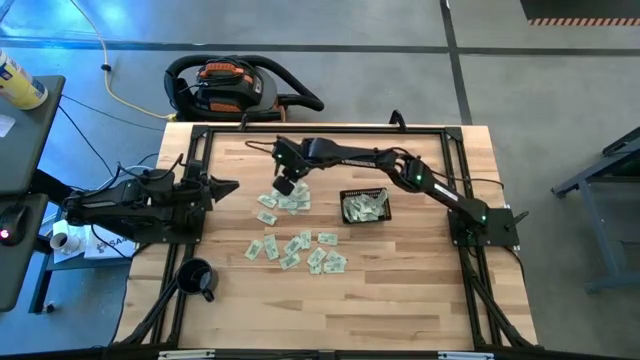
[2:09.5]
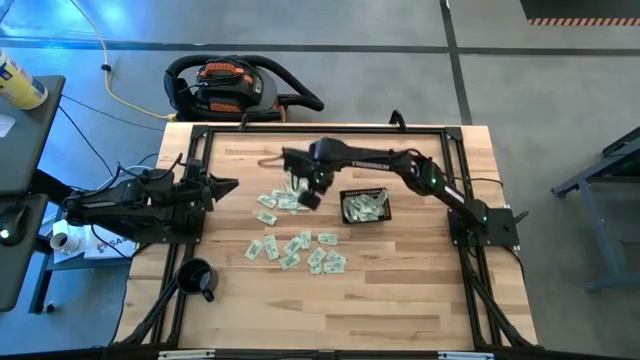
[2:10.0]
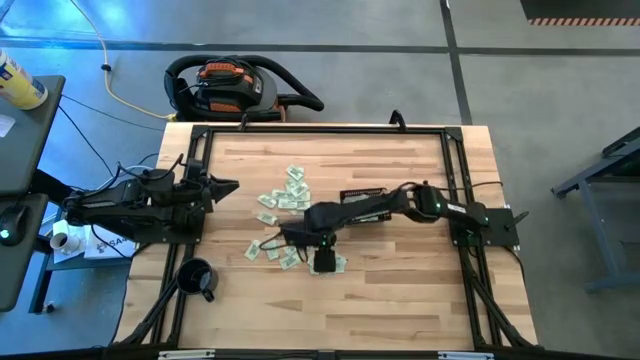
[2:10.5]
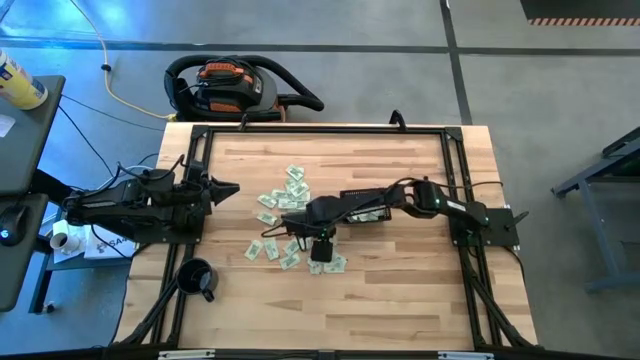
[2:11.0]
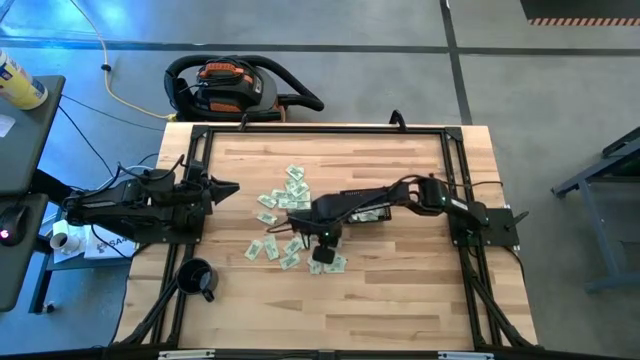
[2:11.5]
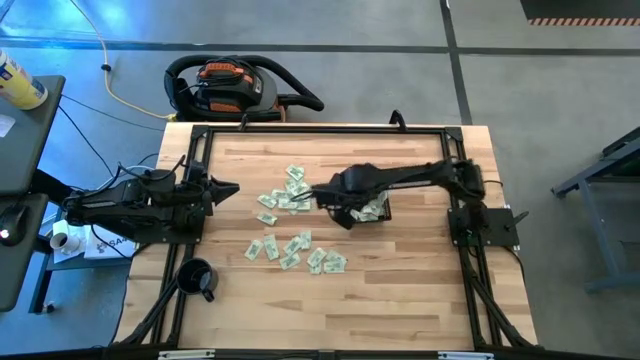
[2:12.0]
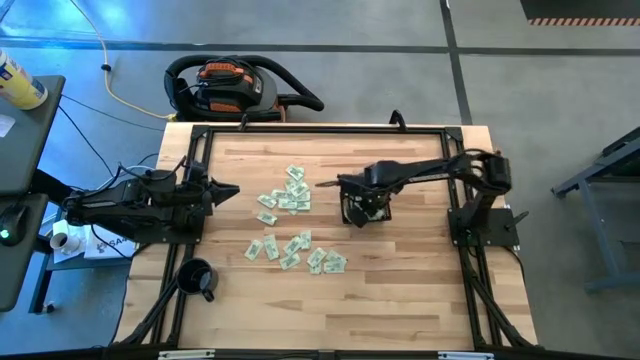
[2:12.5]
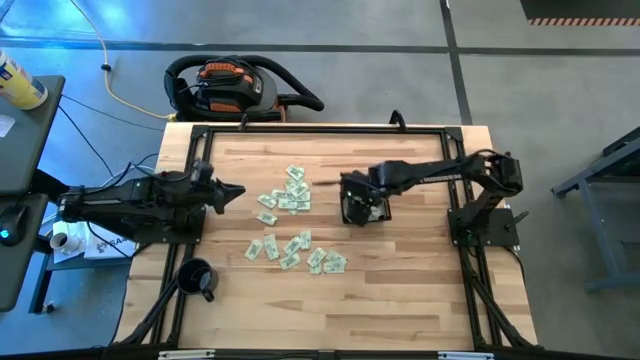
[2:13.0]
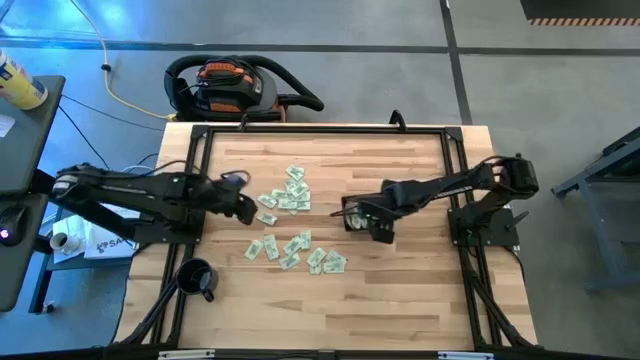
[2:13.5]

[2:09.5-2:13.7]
Task: Pick and place Stevia / Truvia into bins
Put the green stevia packet into the black bin

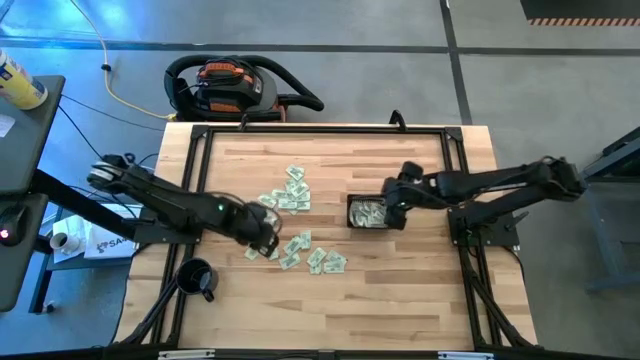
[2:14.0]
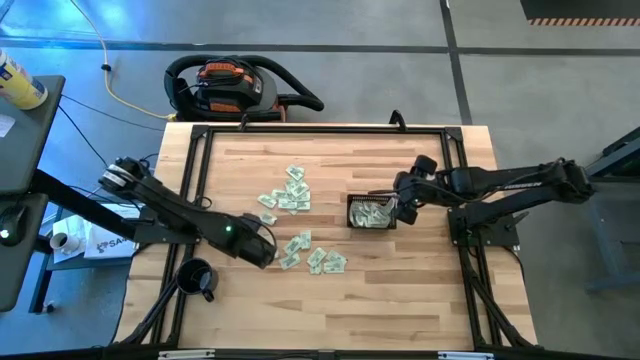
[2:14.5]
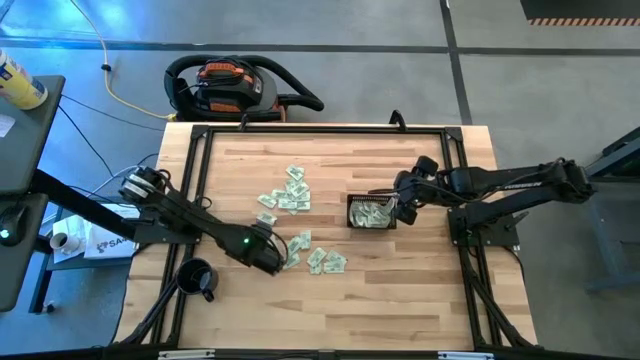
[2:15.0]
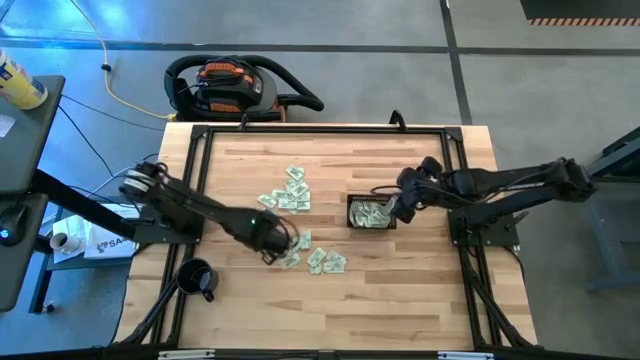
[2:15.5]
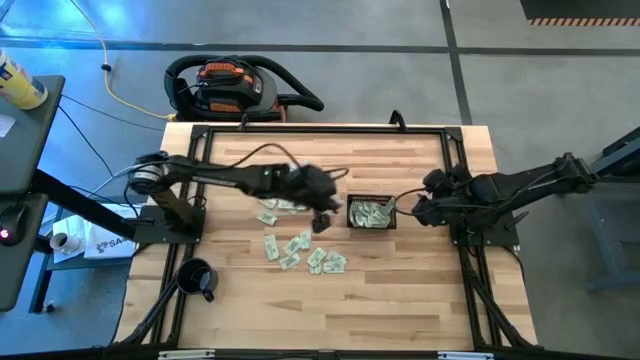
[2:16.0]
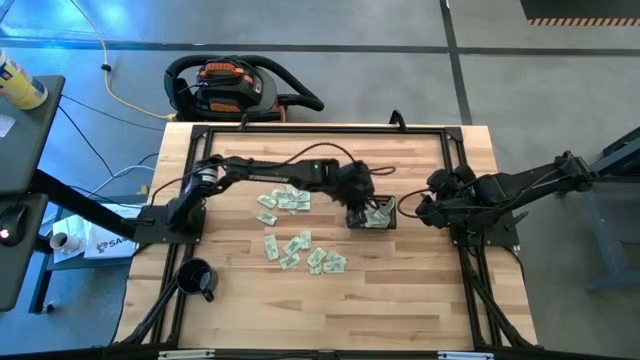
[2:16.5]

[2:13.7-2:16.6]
Put the green stevia packet into the black bin

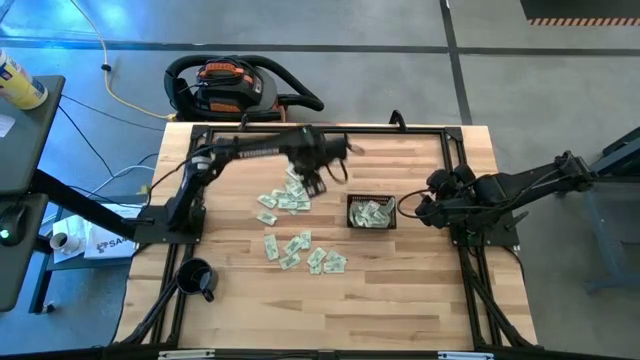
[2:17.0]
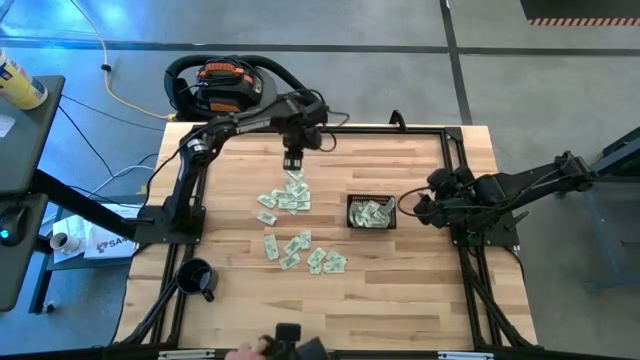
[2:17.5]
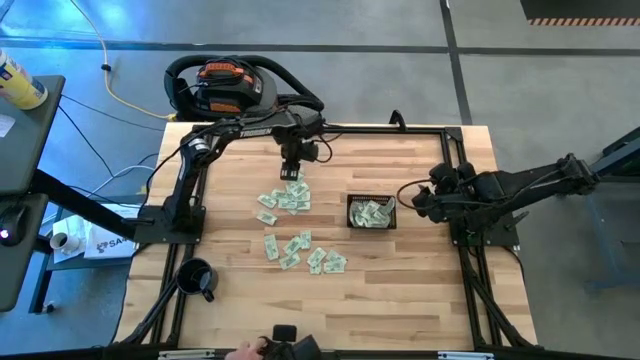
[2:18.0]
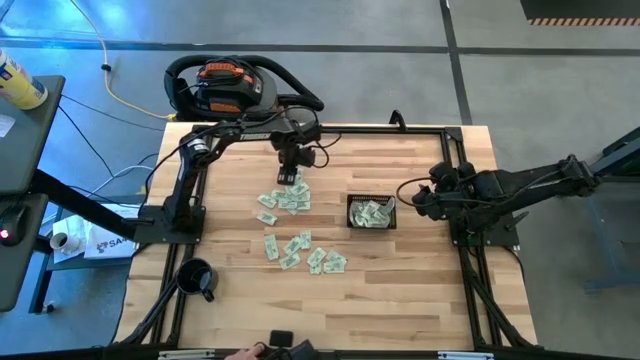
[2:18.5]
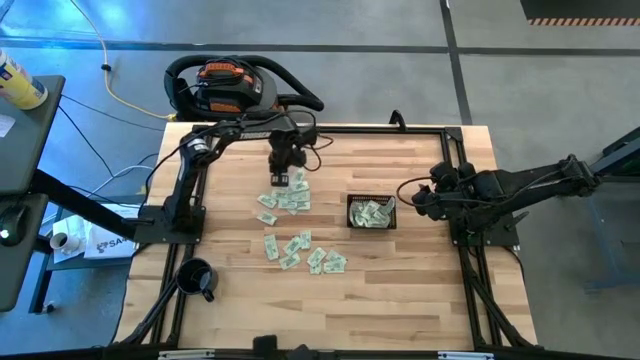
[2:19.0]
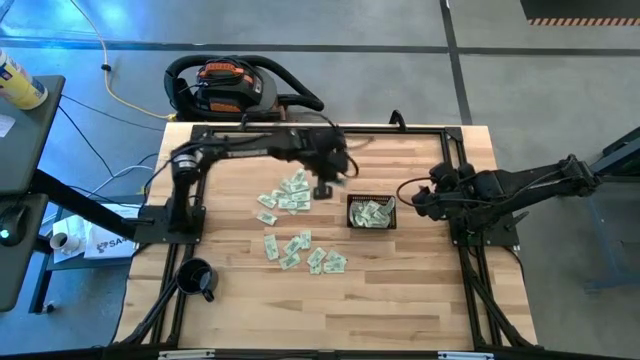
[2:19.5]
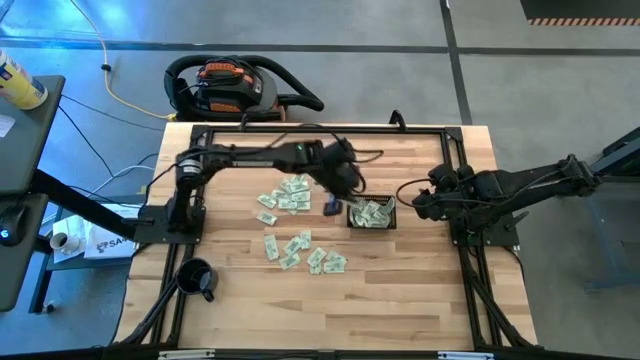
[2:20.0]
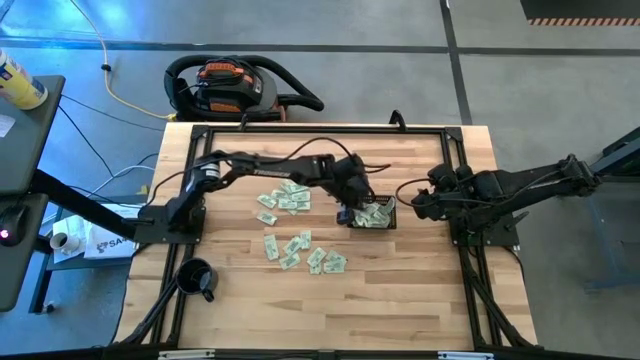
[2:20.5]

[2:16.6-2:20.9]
Put the green stevia packet into the black bin

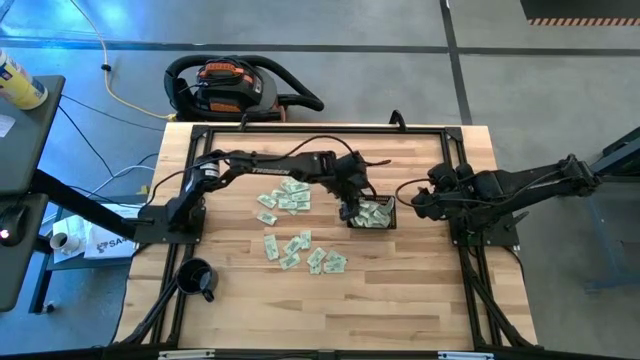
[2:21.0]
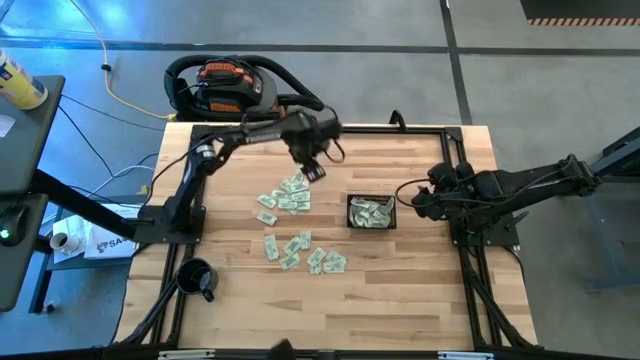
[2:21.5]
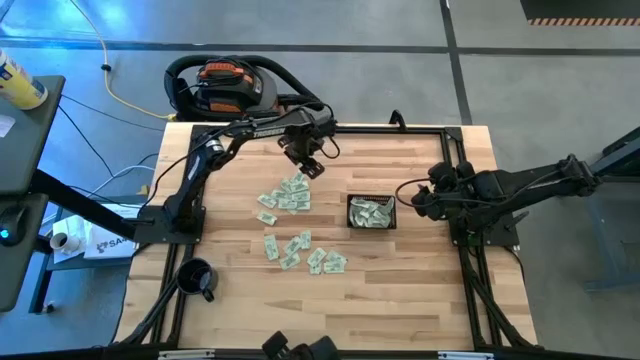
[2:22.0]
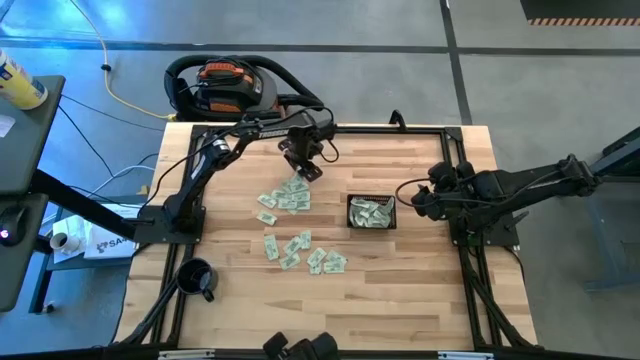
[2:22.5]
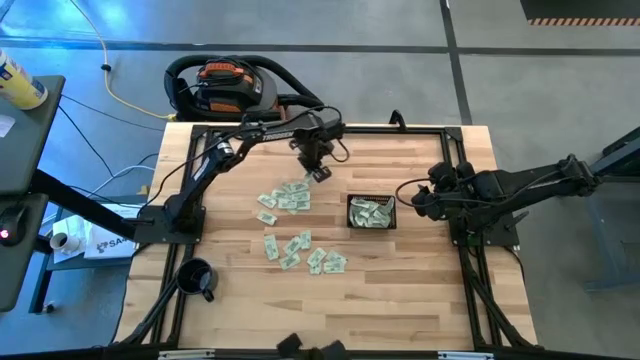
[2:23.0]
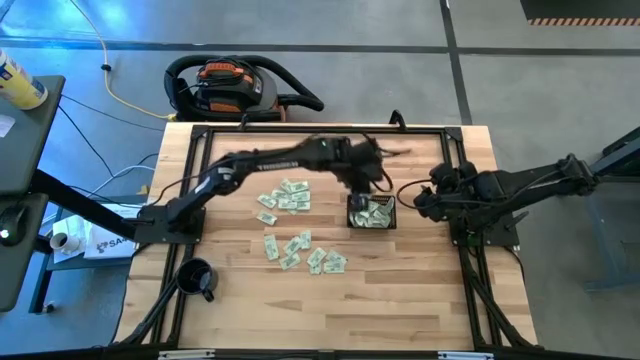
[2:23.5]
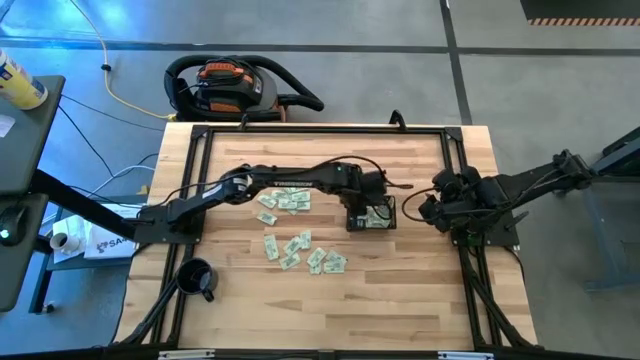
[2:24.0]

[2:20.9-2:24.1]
Put the green stevia packet into the black bin

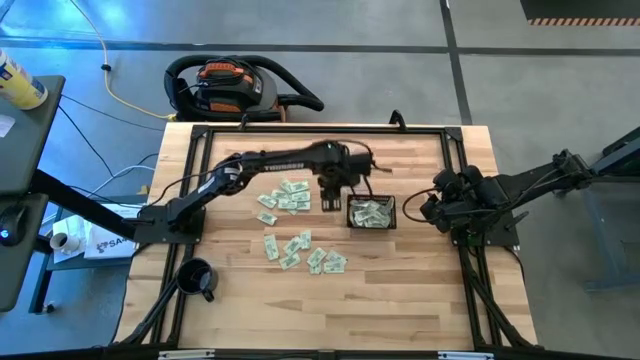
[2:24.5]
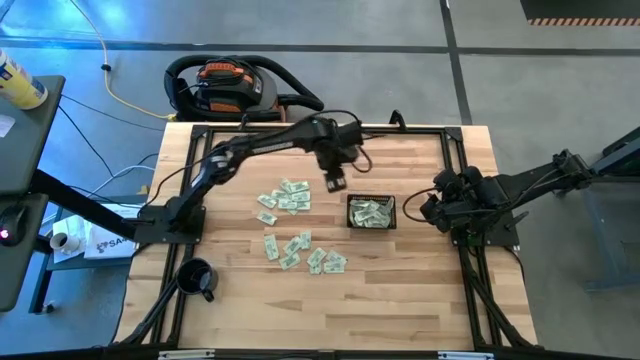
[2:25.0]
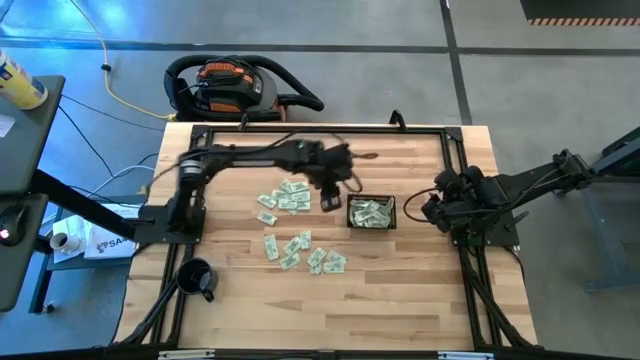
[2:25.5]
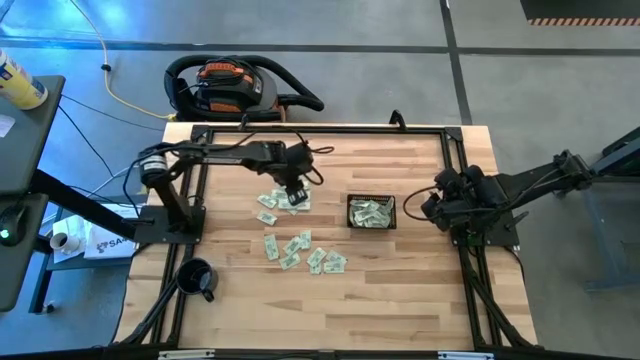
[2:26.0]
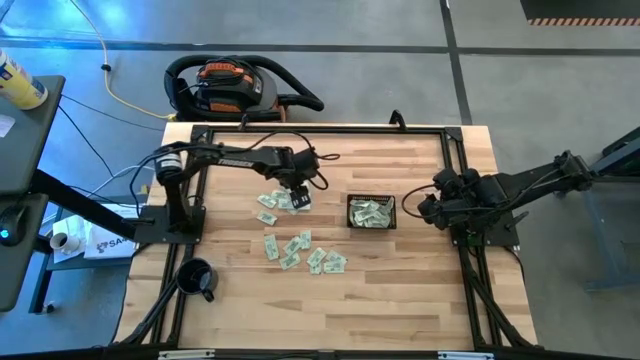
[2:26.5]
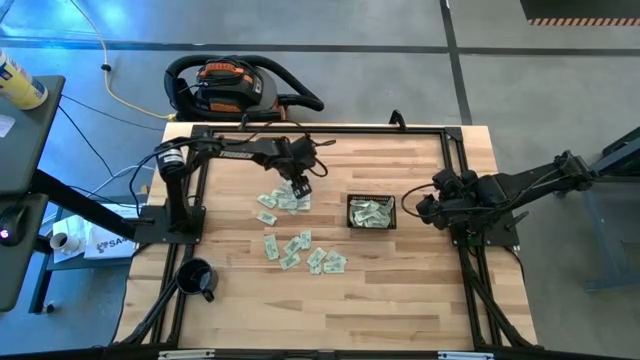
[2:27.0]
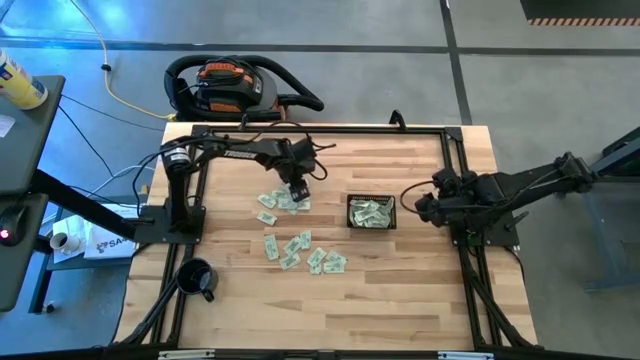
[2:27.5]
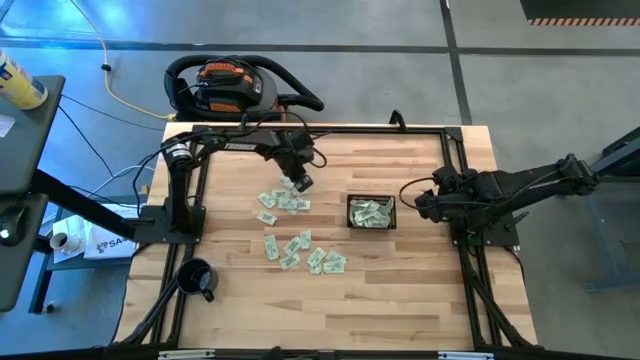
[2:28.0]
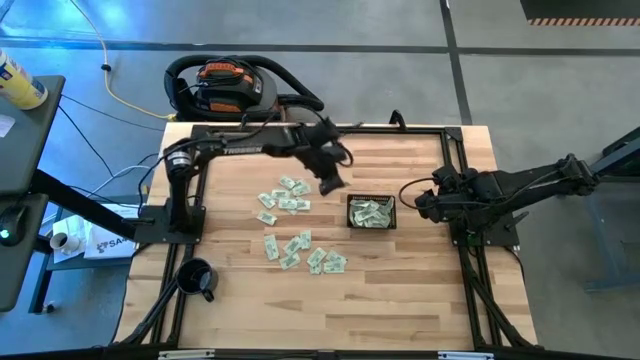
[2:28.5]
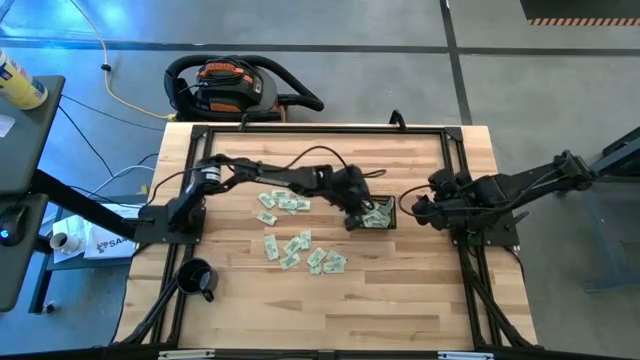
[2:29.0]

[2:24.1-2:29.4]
Put the green stevia packet into the black bin

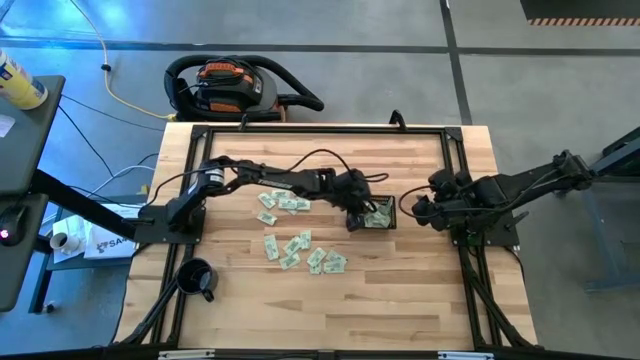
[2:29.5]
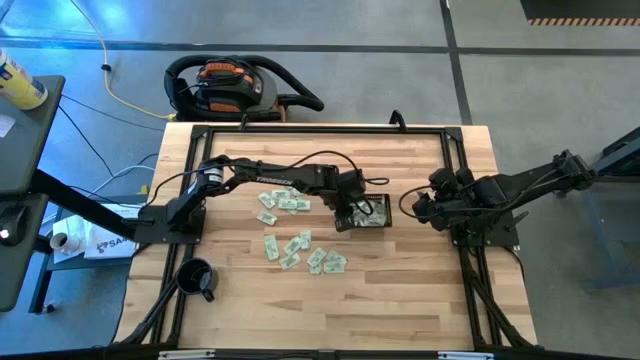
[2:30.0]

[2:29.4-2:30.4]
Adjust the black bin

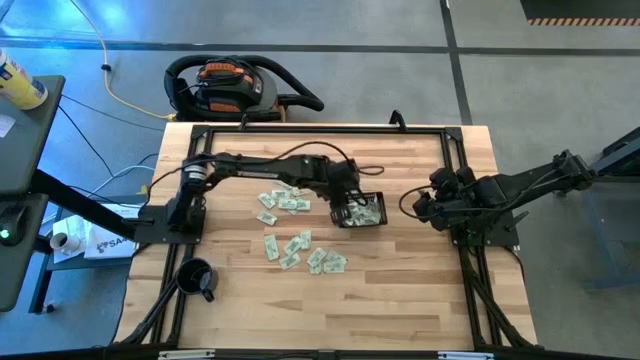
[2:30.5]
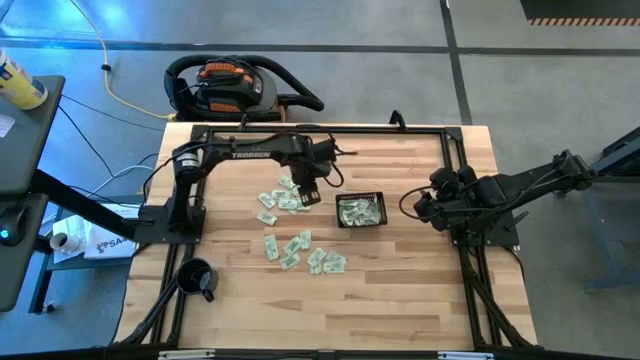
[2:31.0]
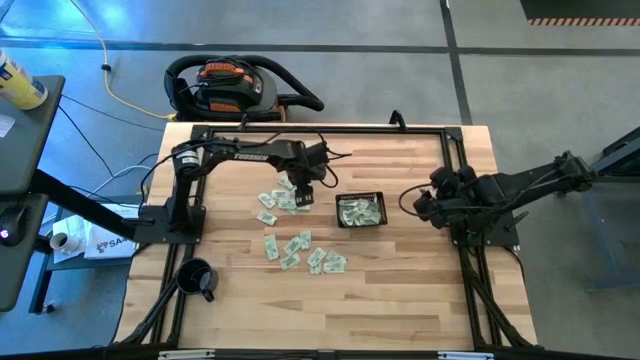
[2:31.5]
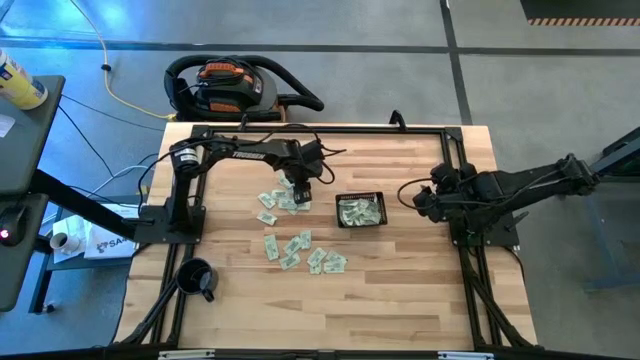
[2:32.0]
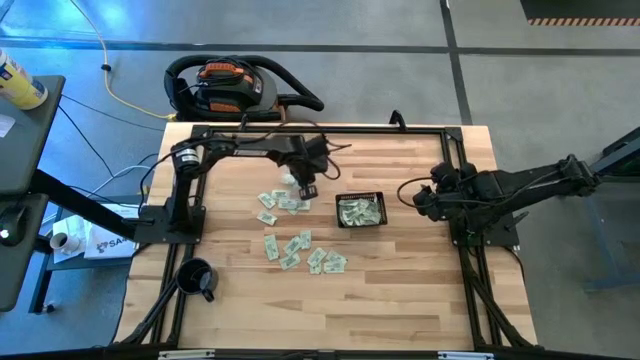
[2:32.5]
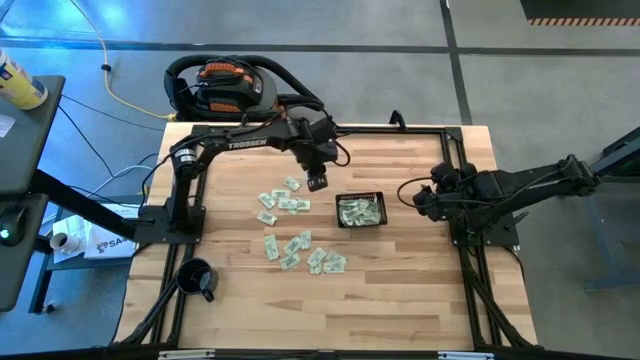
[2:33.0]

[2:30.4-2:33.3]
Put the green stevia packet into the black bin
